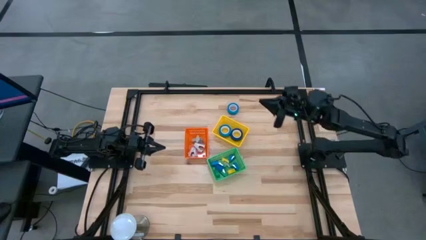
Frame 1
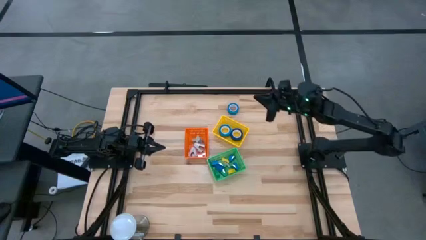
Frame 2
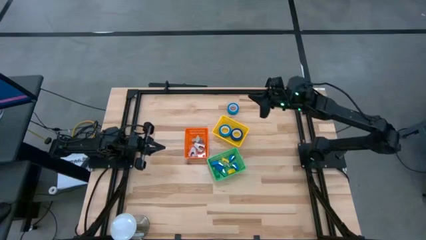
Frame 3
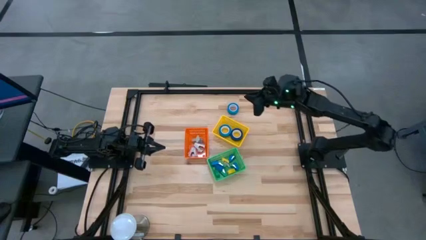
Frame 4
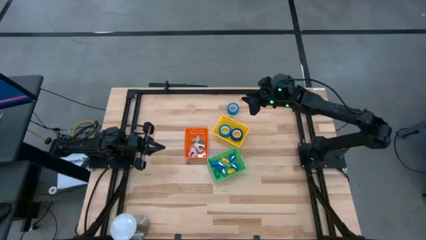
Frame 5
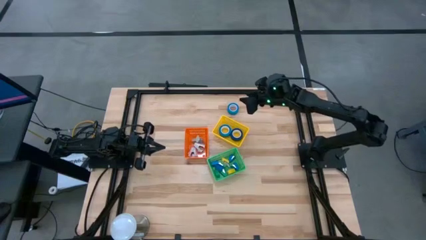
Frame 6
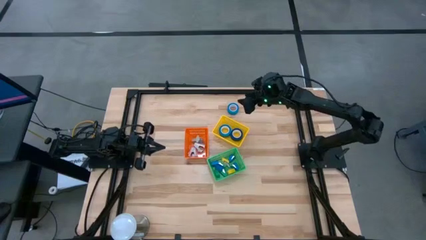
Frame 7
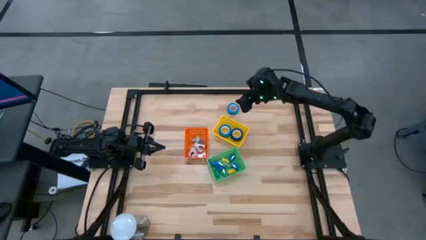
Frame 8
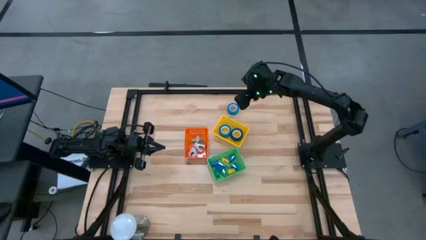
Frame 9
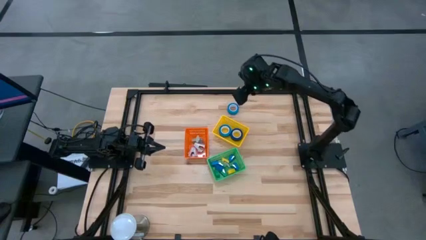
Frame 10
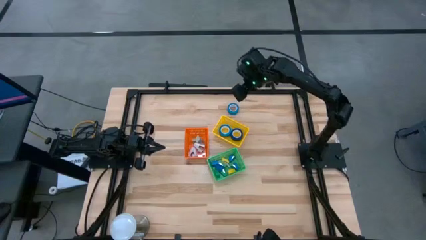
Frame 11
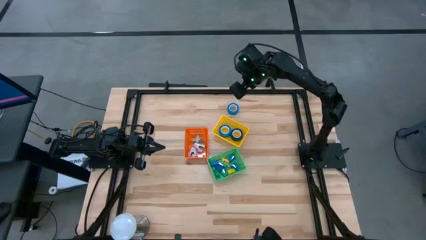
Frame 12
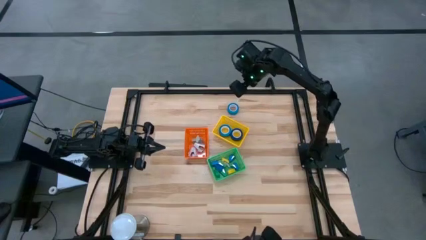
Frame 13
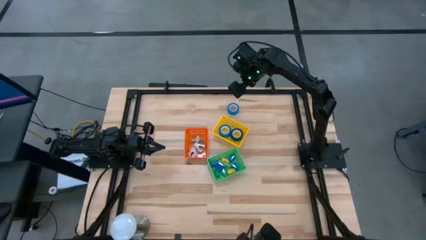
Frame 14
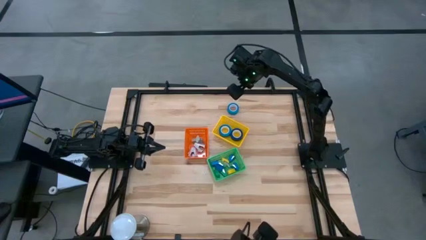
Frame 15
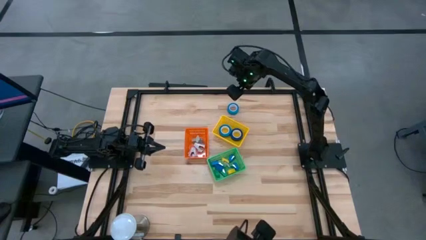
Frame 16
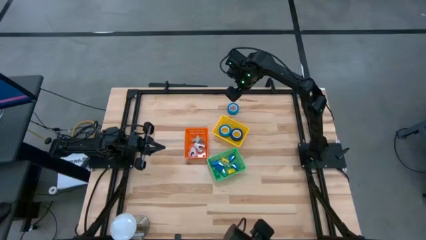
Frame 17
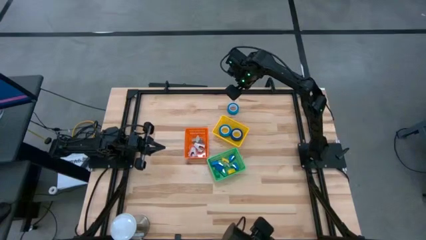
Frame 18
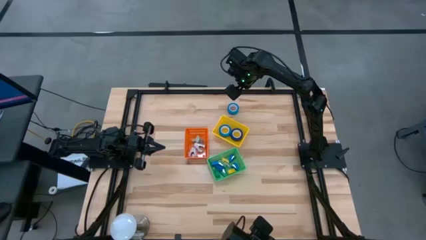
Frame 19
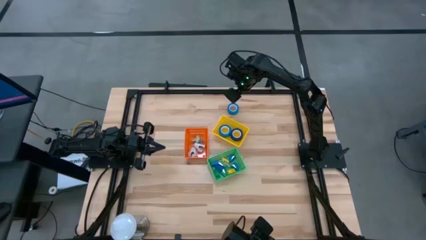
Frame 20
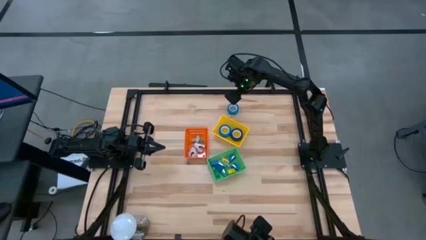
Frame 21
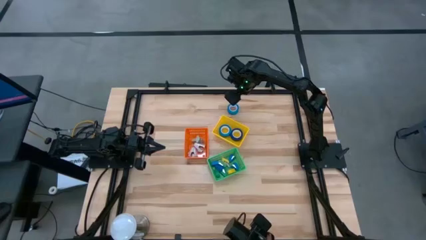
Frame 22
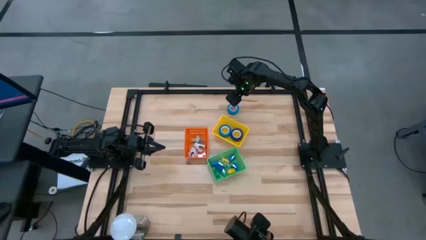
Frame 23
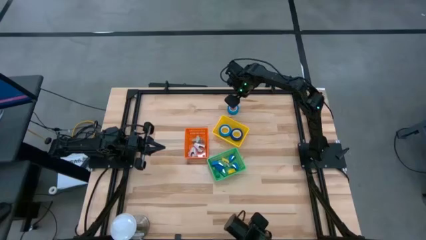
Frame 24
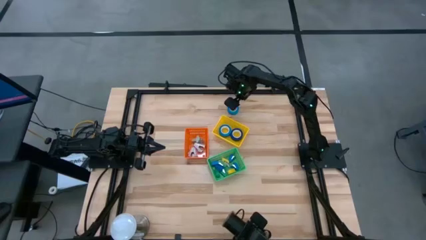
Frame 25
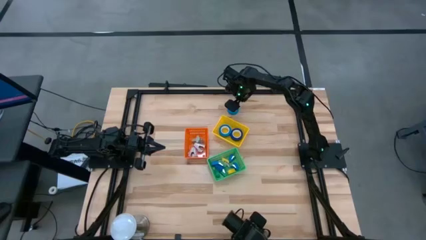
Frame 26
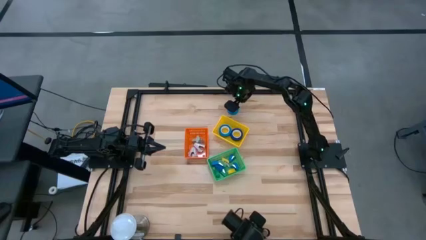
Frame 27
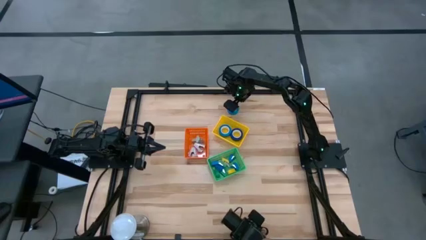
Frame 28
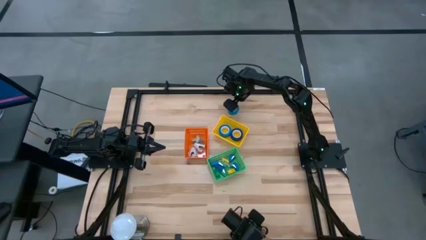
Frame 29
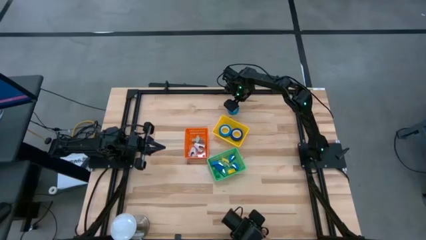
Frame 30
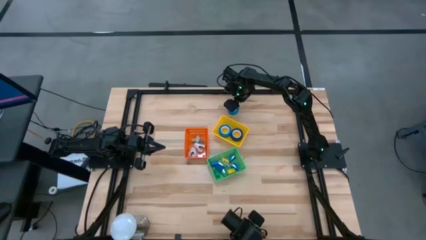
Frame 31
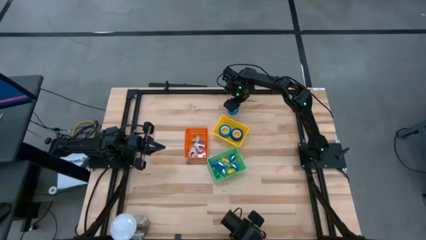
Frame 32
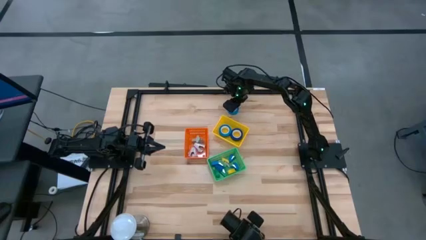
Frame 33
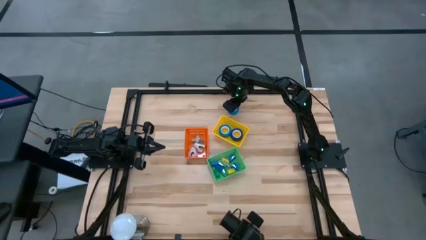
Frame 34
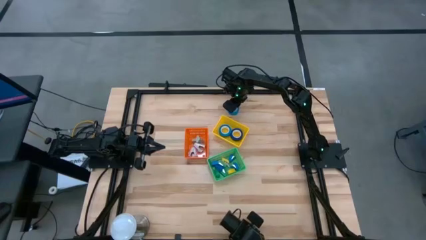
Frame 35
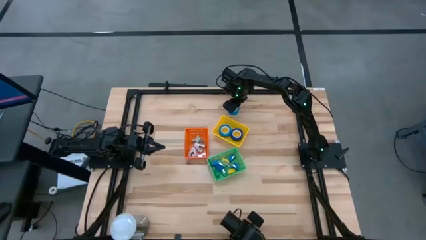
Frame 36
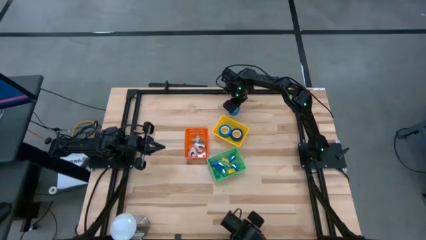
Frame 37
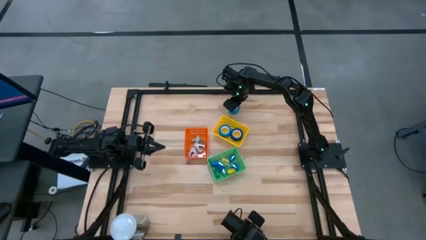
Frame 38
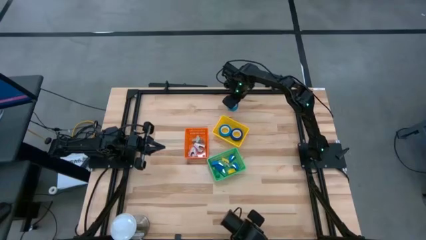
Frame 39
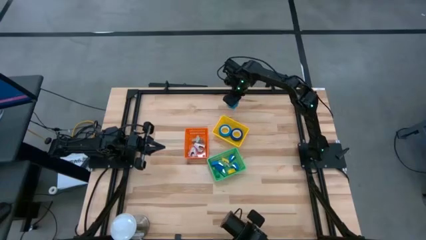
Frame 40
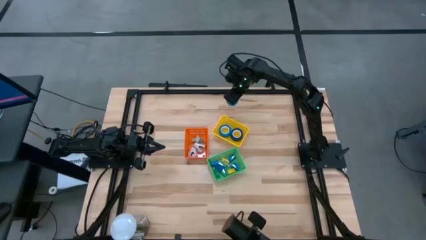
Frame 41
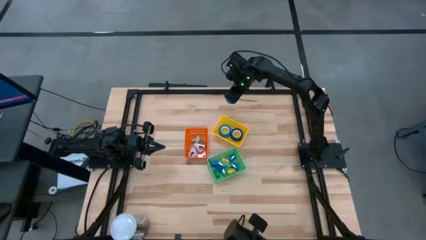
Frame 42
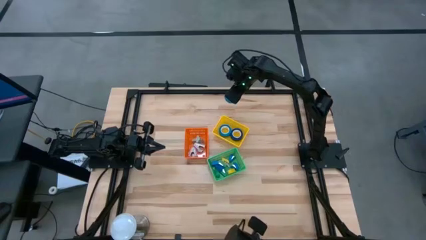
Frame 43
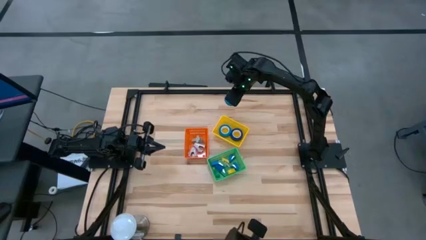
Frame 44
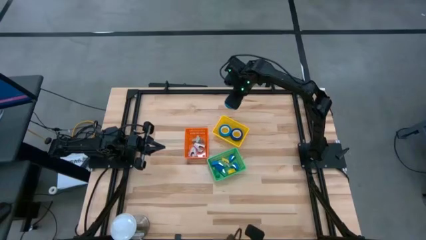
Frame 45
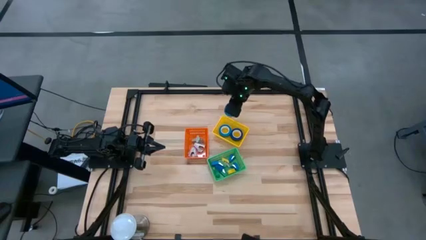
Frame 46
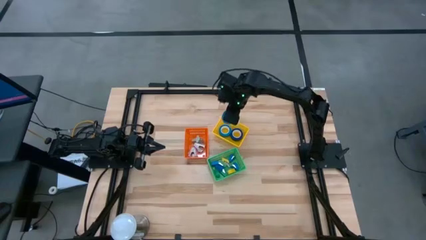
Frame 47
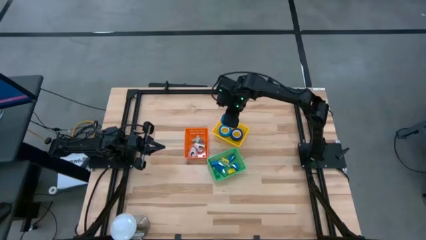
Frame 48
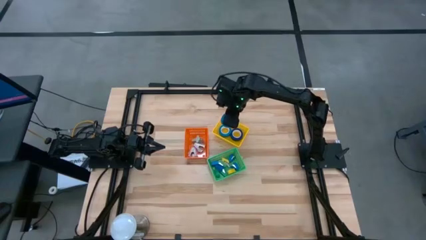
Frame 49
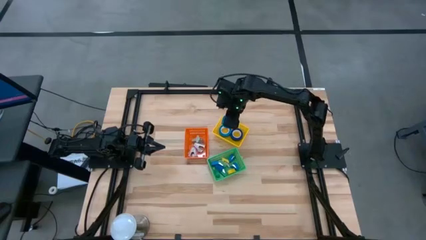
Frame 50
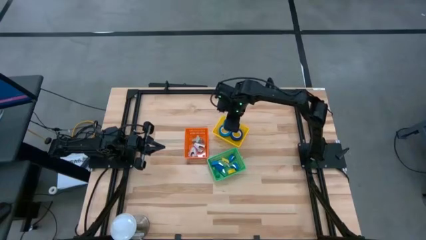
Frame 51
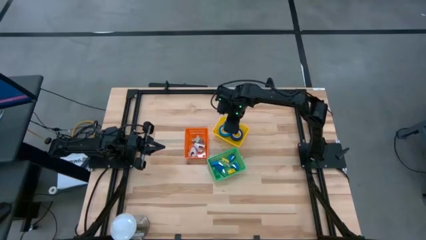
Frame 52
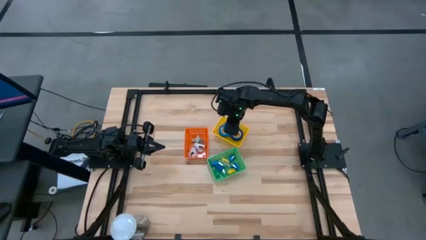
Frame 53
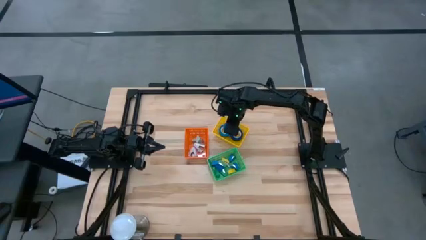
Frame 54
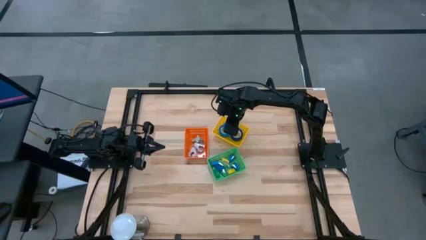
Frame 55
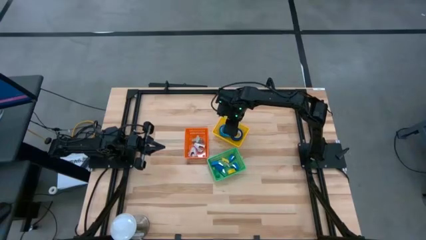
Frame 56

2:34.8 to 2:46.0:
Task: Pick and place Stapler, Stapler remover, tape
Put the blue tape into the yellow bin
